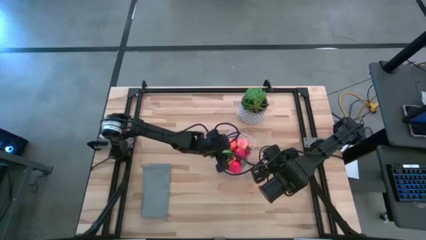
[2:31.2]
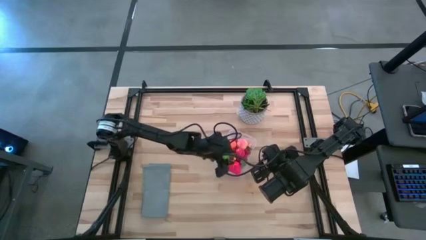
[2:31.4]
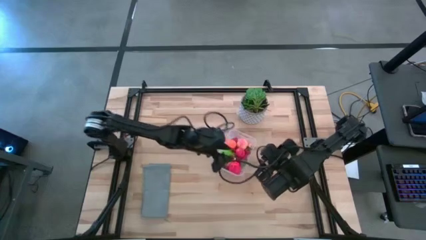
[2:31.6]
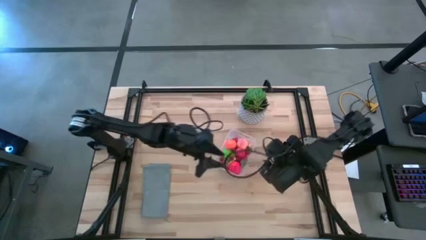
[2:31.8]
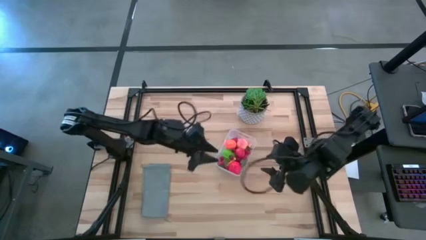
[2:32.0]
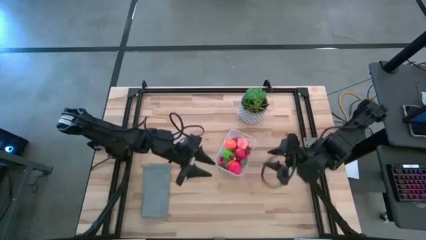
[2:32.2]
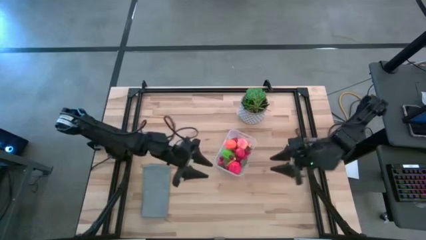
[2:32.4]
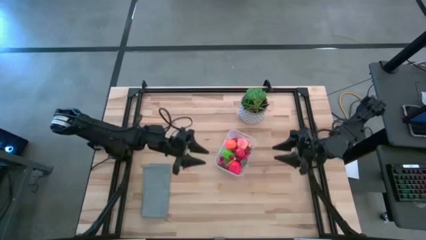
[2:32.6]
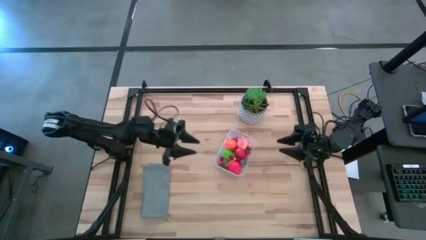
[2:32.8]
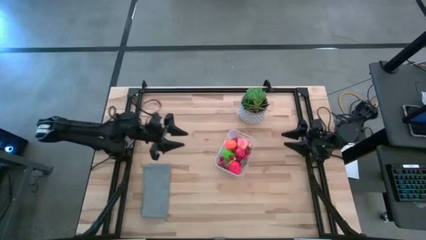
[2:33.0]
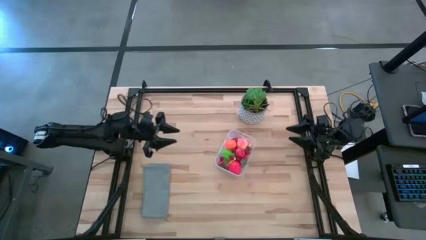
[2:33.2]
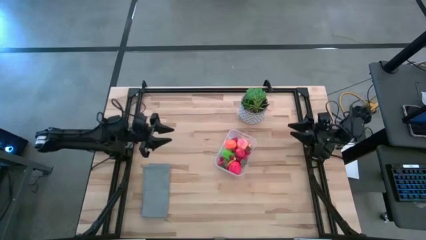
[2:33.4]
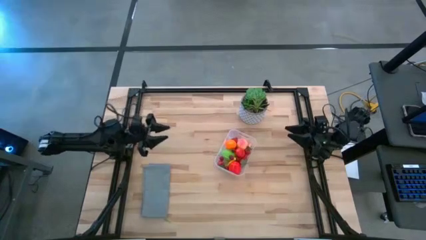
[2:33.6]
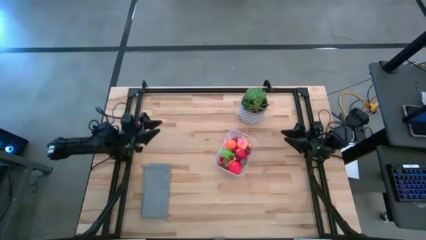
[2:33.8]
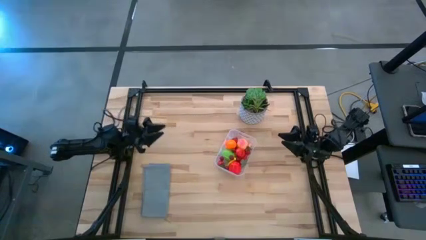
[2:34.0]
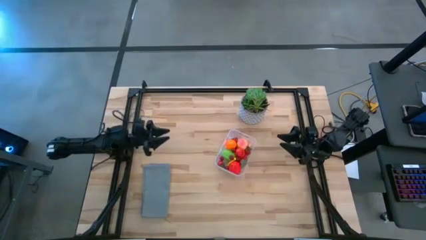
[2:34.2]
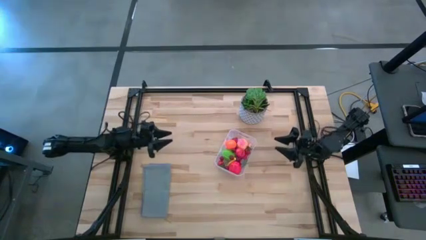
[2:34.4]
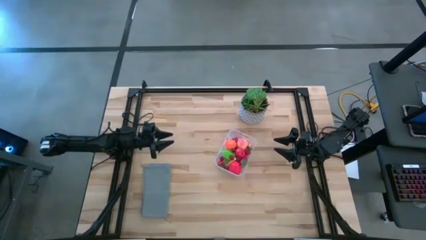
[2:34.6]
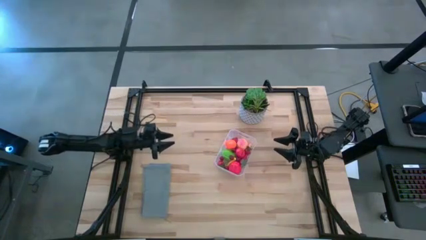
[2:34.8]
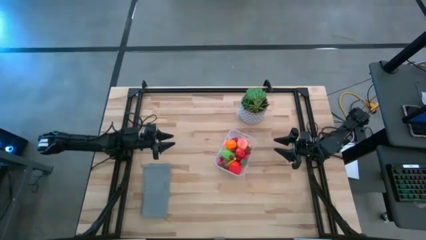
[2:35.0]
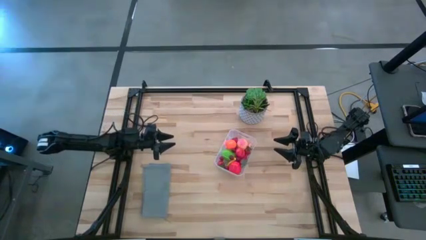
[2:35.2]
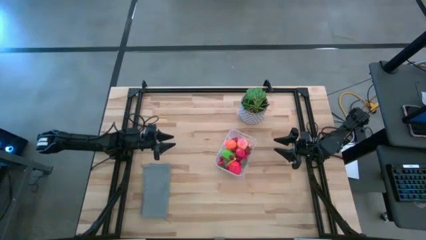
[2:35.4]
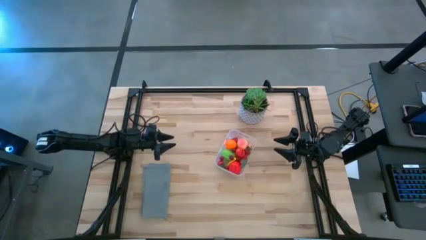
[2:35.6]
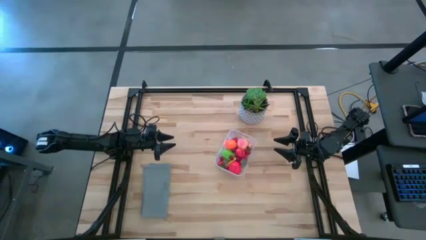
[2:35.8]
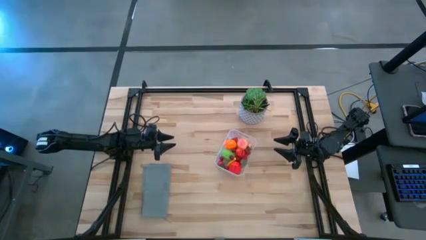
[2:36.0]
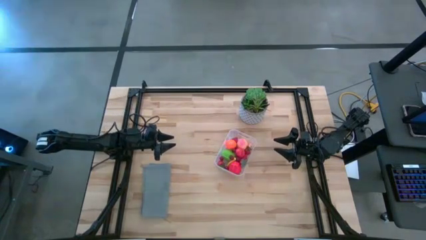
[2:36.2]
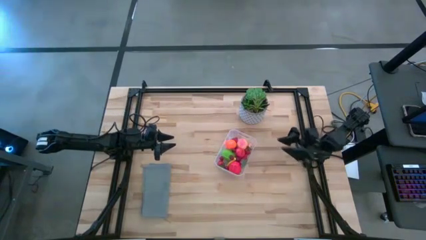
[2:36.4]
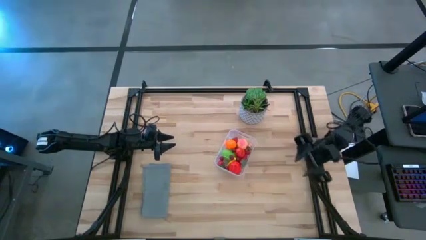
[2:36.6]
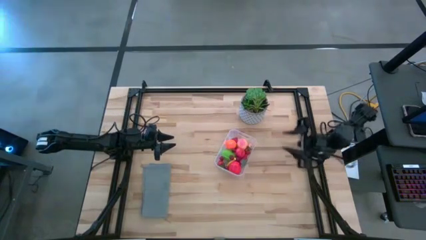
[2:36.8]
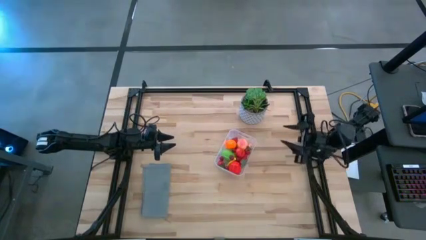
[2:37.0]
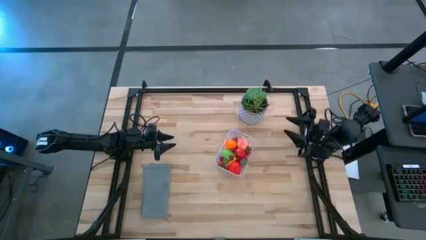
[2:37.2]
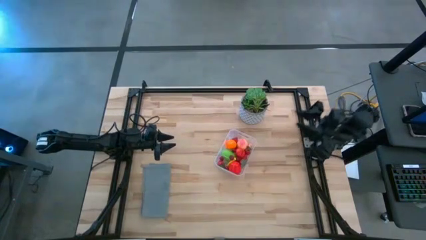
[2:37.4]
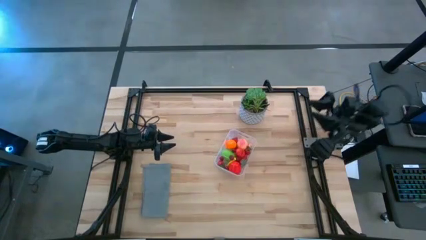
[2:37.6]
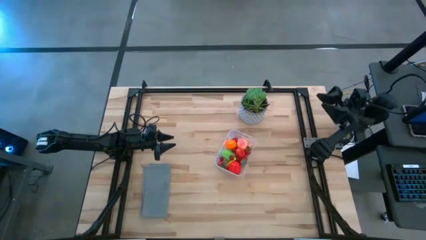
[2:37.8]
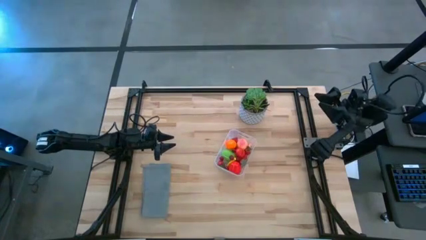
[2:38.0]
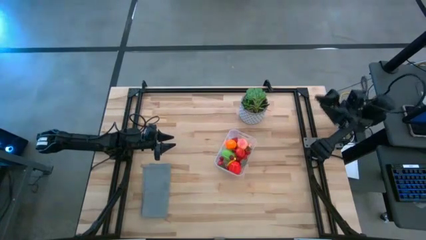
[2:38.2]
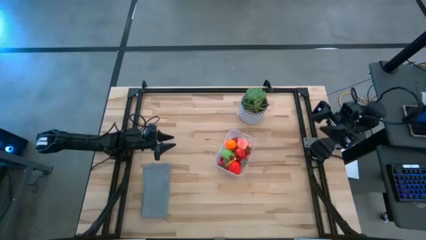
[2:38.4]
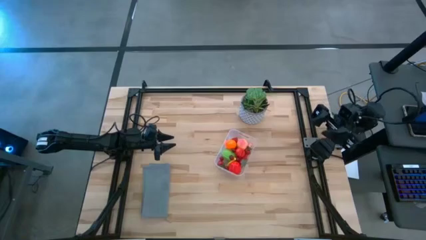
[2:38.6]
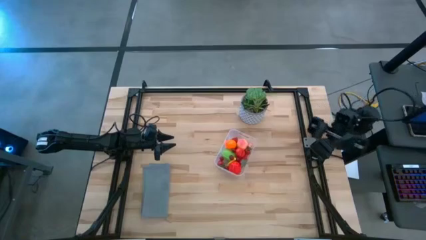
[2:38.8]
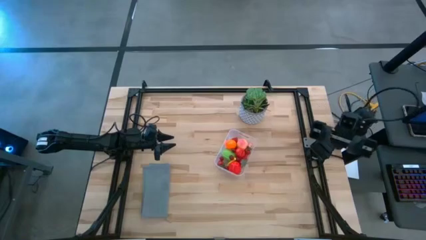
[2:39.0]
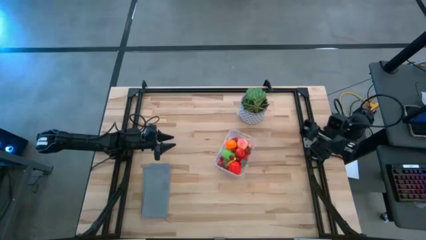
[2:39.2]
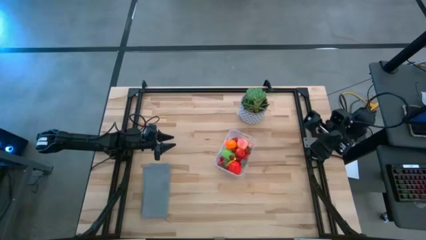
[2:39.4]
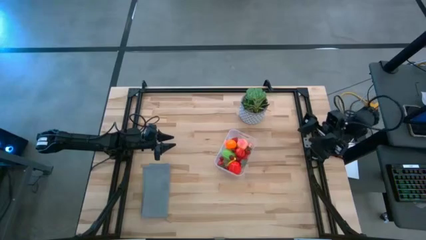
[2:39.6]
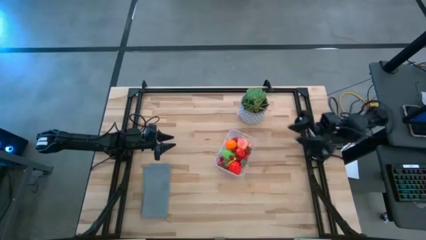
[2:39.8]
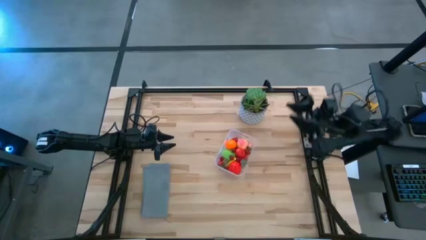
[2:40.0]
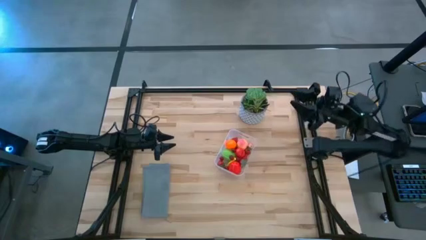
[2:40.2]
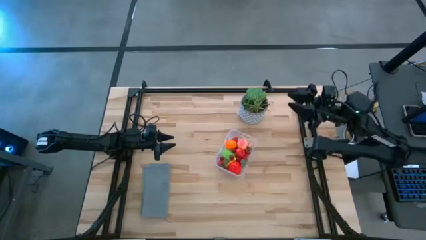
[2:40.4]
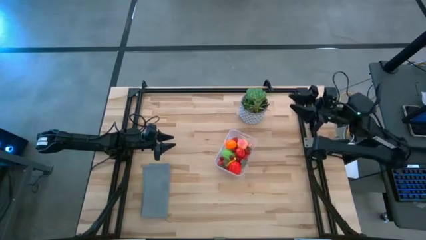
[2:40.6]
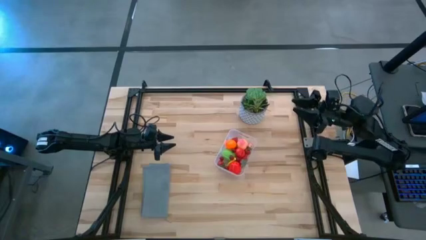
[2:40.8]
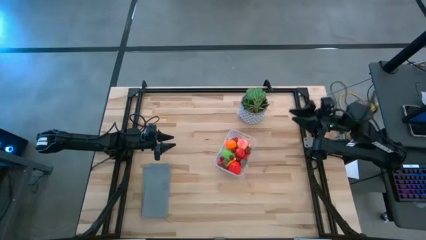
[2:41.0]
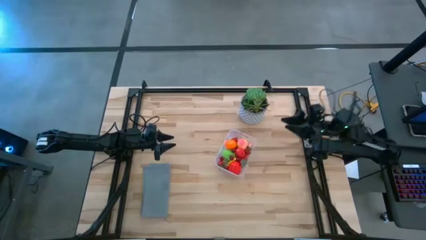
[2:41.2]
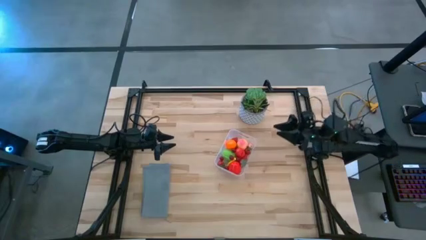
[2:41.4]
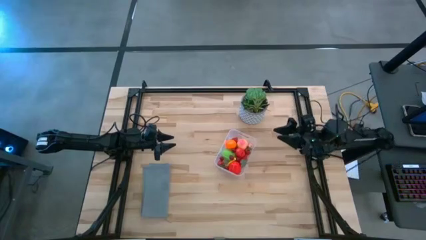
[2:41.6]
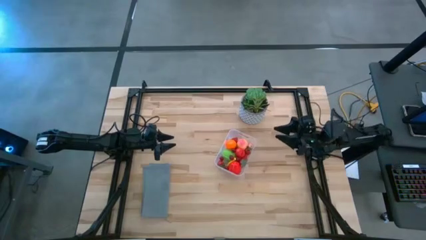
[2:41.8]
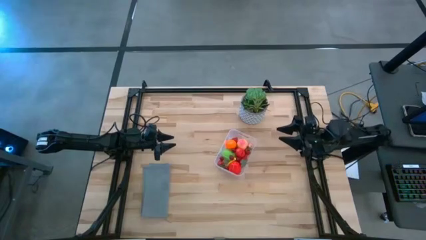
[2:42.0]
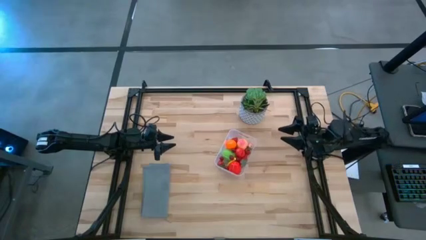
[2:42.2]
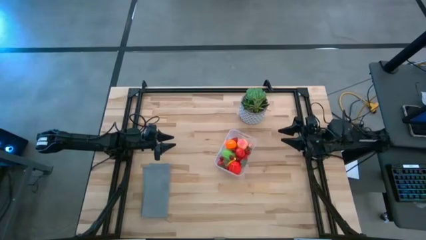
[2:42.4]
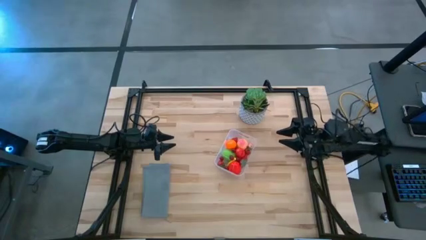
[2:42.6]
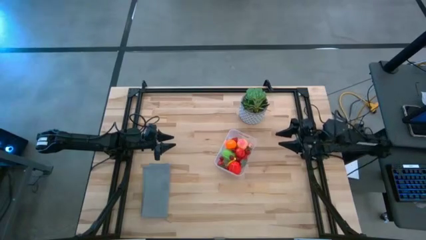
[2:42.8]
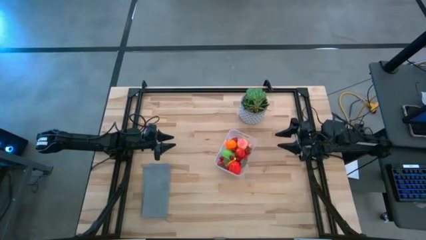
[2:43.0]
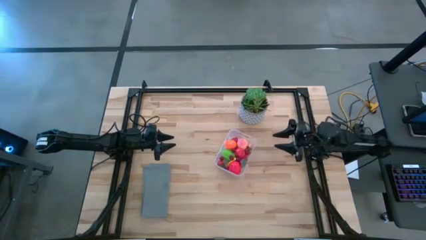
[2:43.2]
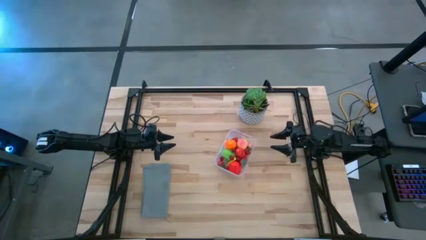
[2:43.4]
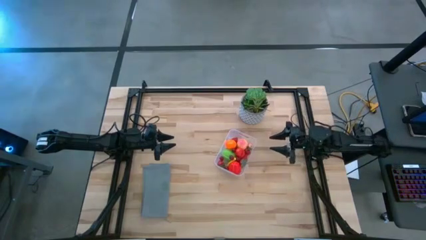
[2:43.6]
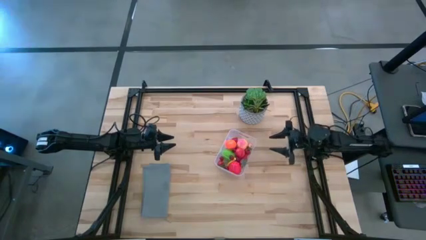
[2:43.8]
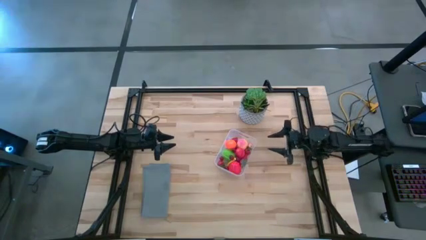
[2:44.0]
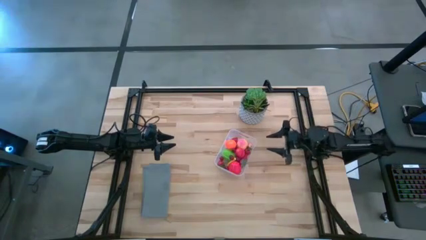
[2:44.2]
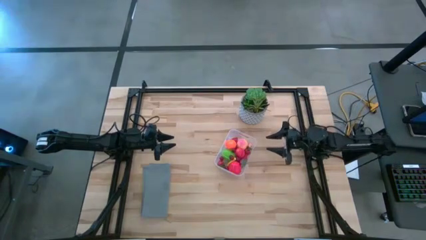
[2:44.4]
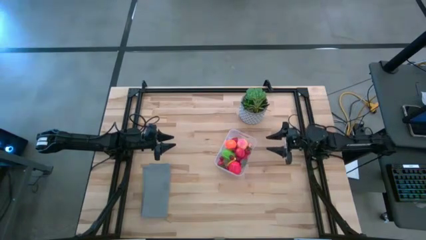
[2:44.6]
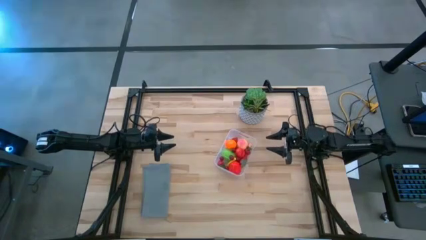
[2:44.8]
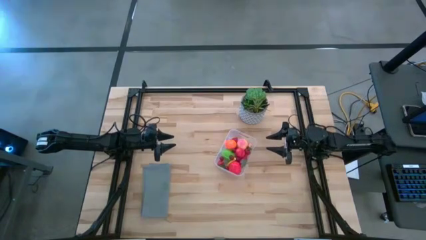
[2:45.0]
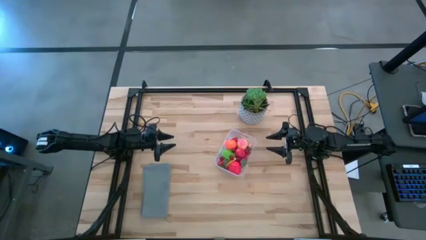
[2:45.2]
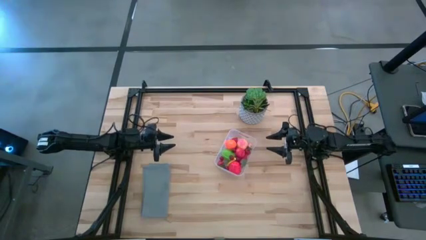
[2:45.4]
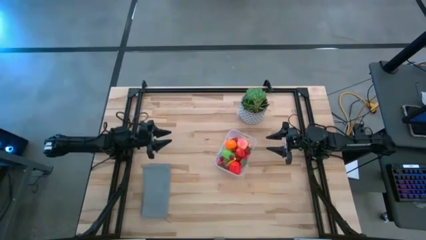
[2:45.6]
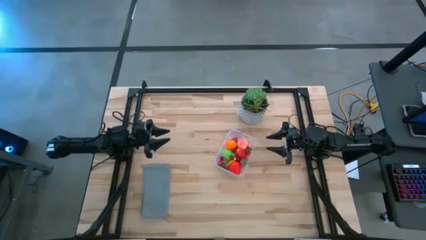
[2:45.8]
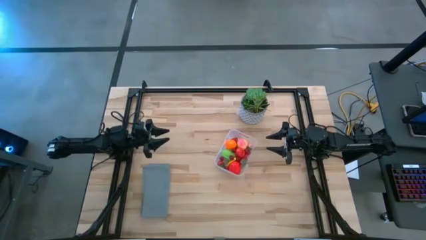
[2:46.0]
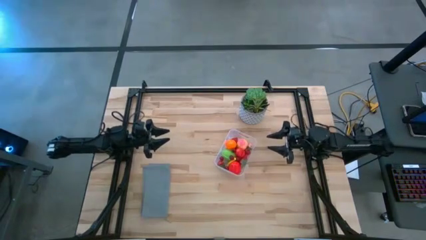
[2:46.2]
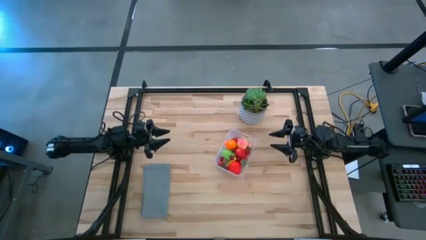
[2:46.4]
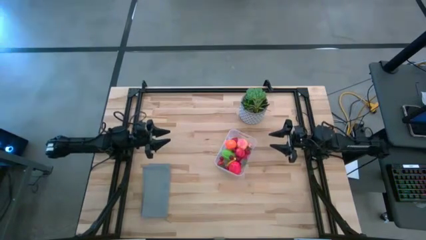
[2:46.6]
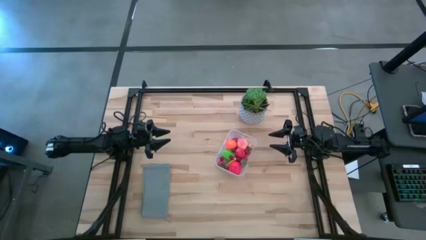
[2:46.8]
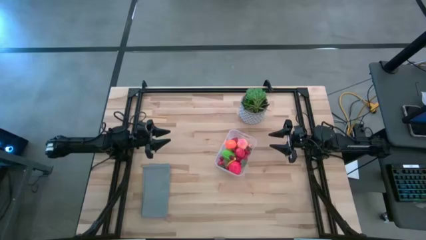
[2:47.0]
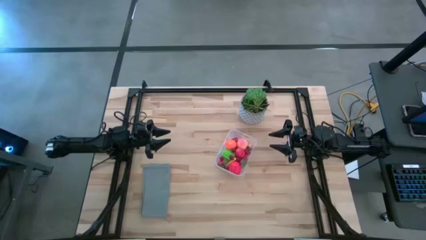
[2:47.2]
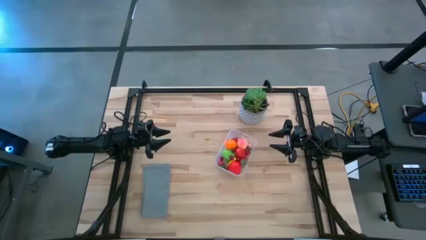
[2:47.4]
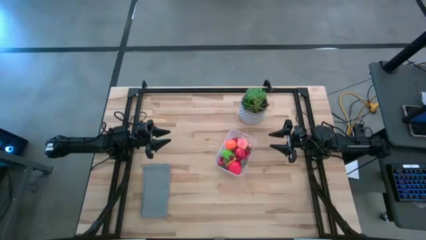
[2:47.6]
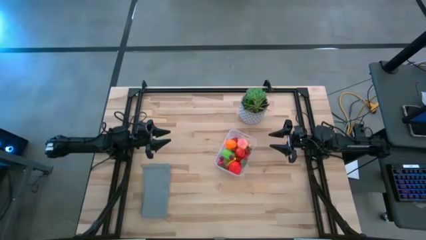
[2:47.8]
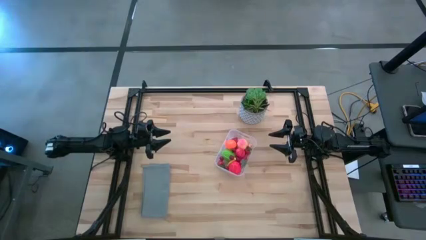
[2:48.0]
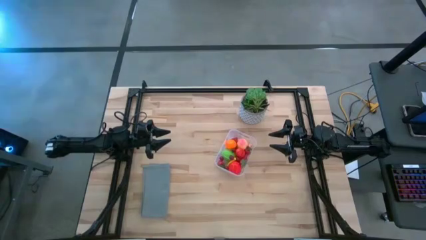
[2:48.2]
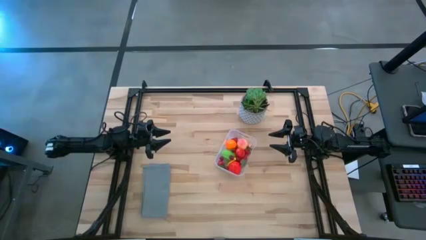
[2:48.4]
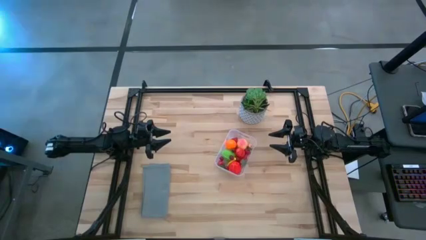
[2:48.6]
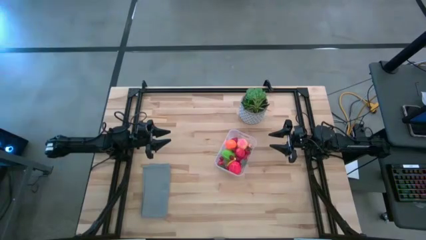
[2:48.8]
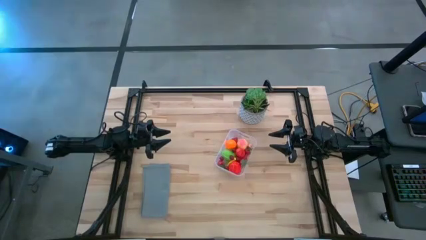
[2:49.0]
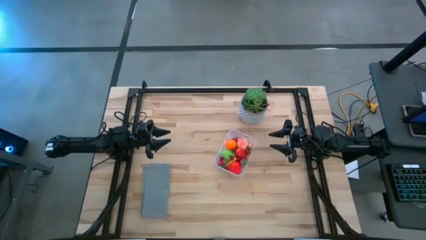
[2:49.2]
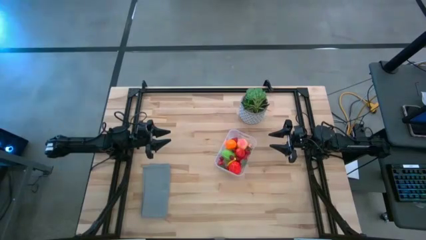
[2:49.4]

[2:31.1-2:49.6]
Task: Pick and placing Produce into tupperware
Return to Home Position
